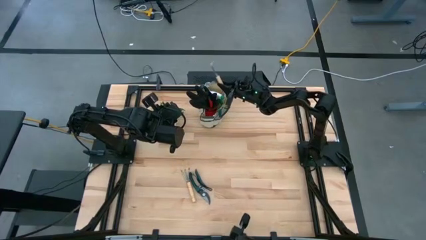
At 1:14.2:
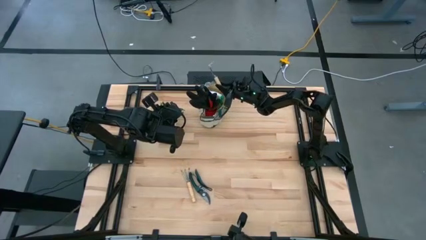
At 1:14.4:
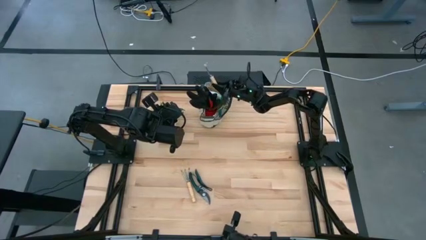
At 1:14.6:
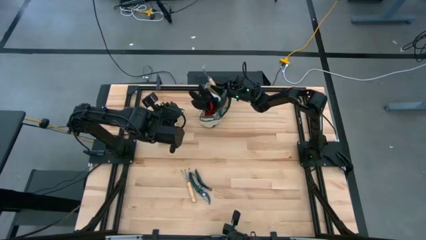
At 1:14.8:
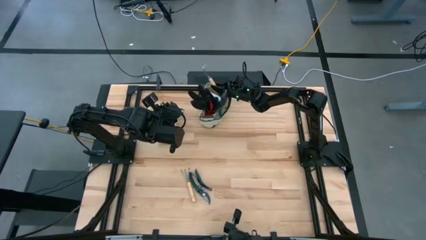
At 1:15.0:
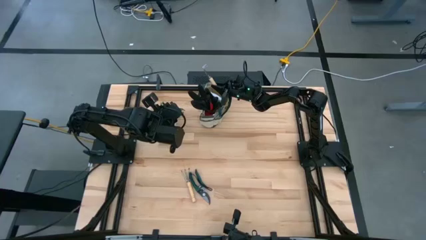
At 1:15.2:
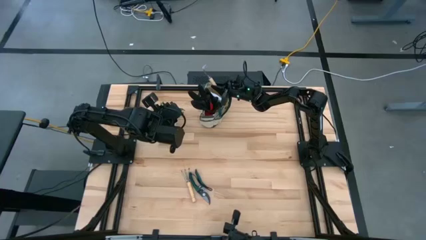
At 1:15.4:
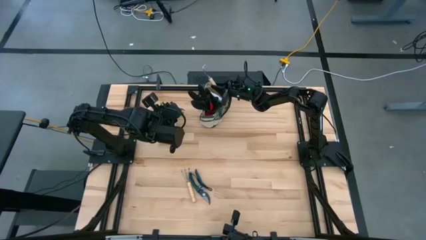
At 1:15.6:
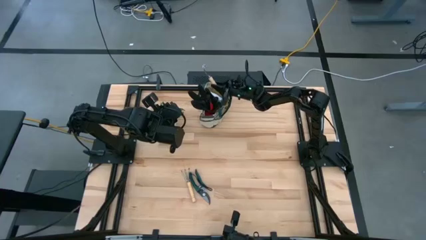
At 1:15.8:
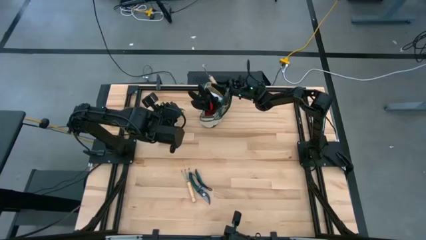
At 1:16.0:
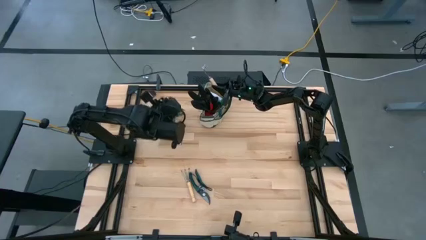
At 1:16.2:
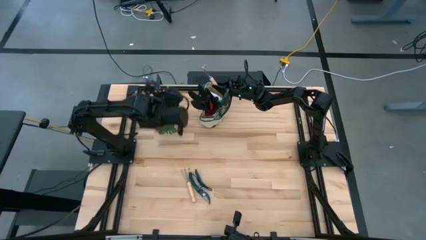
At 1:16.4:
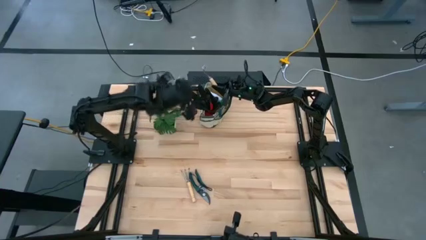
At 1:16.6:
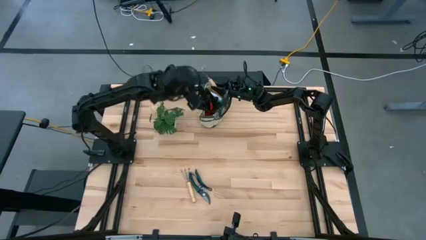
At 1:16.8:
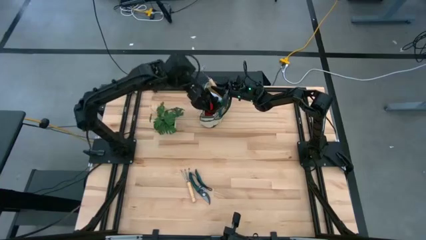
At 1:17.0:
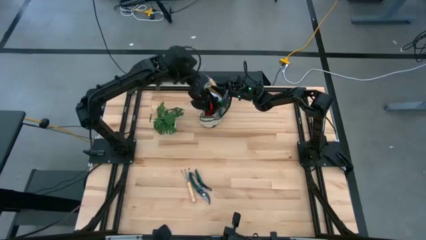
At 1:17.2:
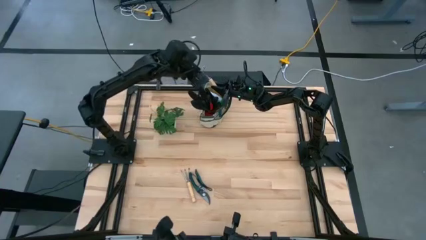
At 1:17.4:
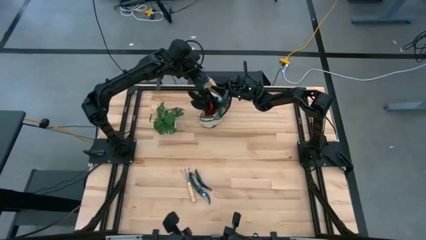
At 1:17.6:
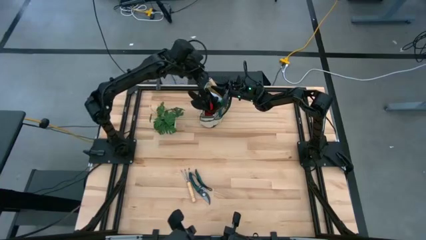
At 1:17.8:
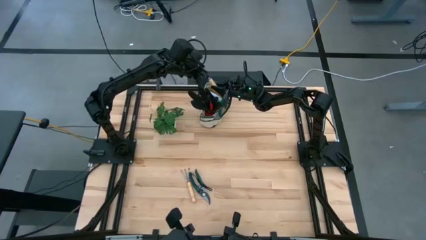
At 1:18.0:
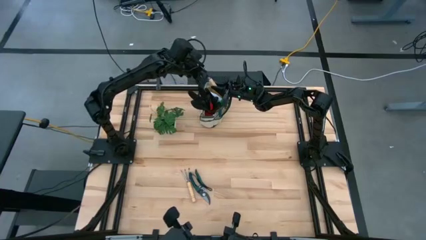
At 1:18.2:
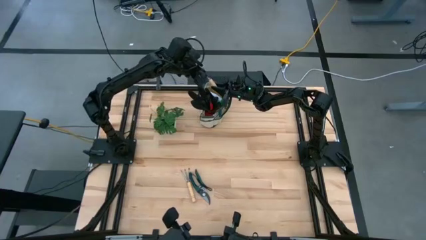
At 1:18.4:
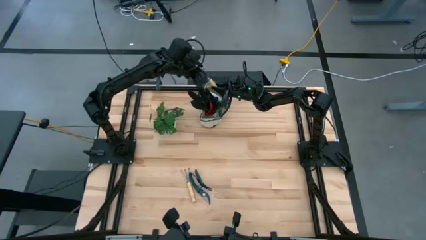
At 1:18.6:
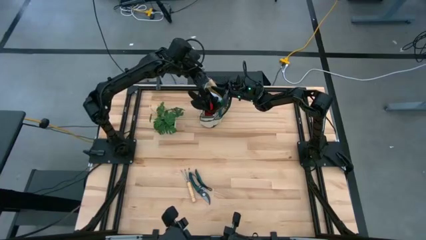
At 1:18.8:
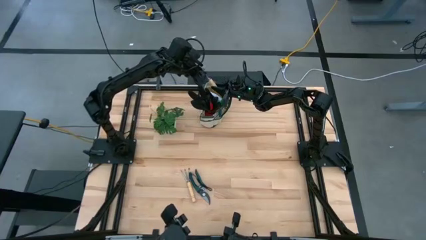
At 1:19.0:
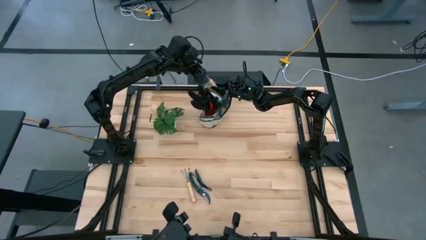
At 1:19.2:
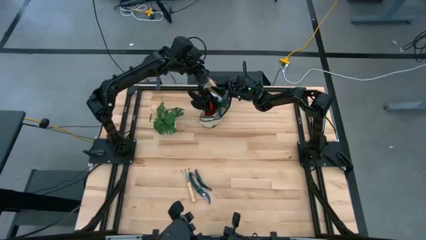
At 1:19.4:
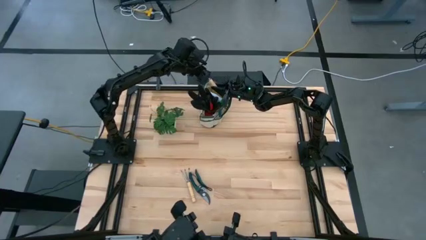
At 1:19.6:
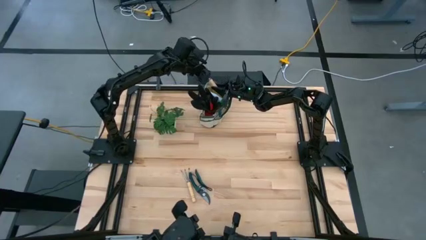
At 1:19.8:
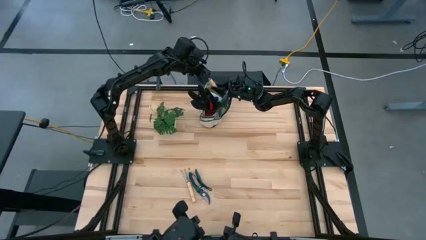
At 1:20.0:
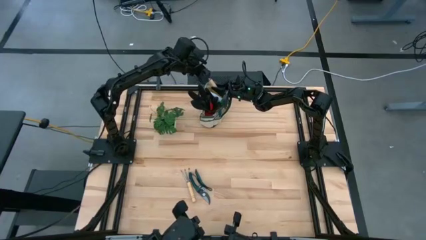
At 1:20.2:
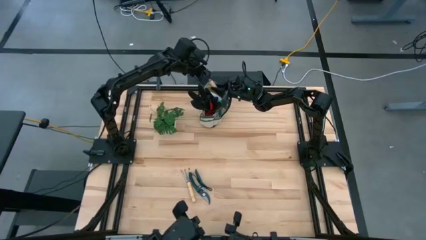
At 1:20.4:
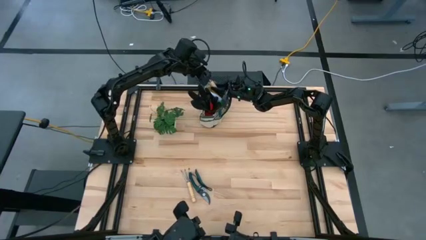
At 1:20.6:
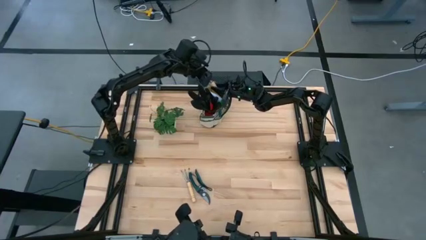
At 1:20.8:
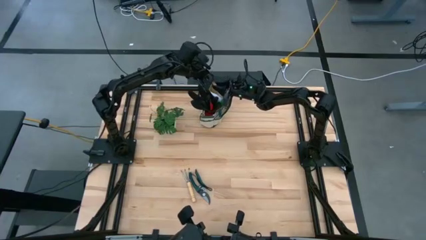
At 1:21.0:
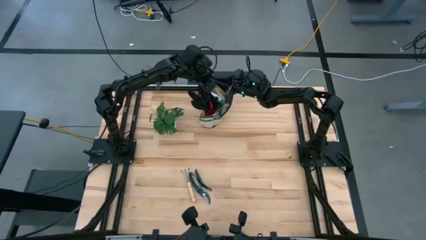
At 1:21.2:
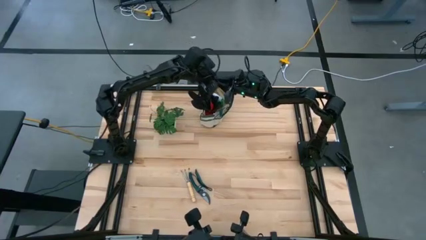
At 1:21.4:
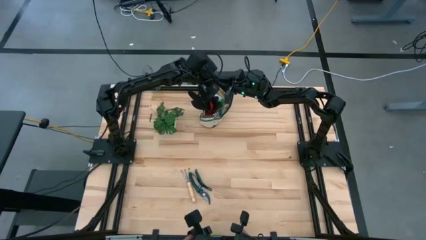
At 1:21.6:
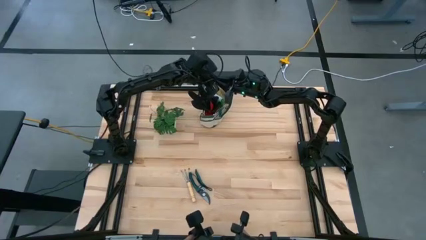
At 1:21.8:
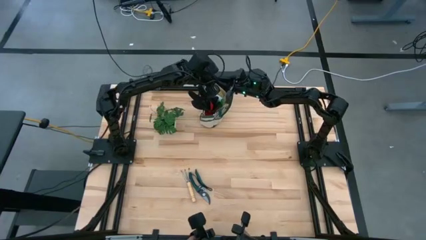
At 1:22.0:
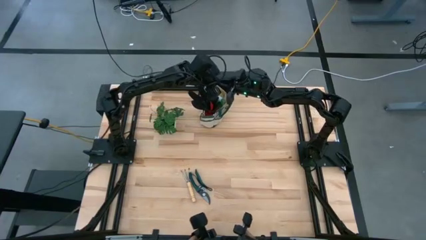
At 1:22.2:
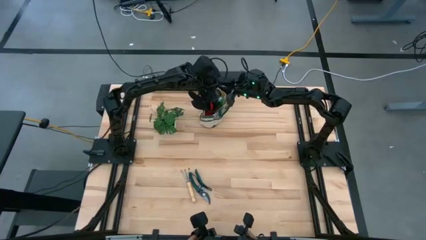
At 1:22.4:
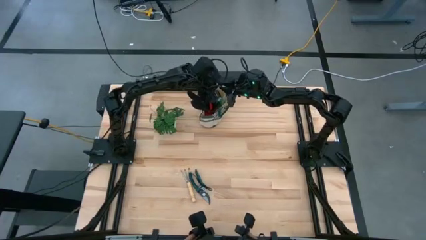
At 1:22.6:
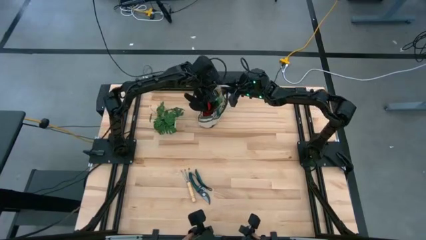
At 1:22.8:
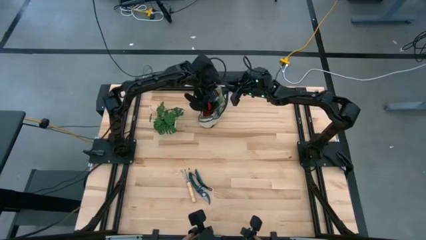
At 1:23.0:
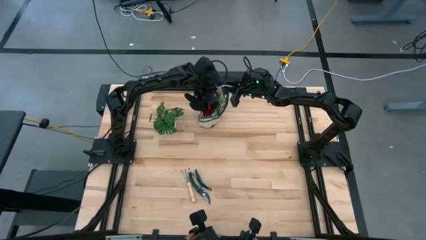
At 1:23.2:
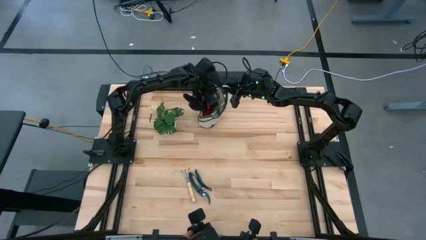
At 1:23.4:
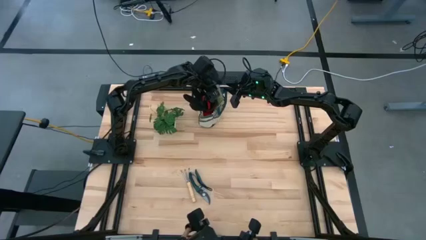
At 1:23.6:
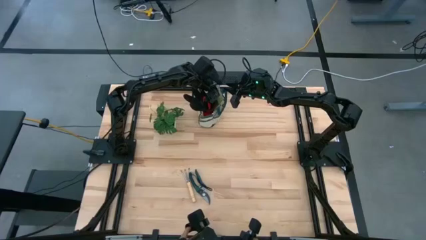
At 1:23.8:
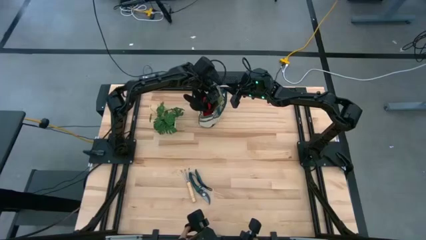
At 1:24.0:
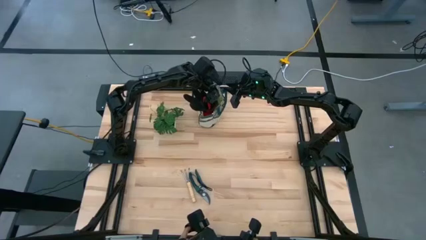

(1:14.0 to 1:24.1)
Task: Pick & Place Garden tools in Gardening bag
Put the top brown hand rake into the white gardening bag
